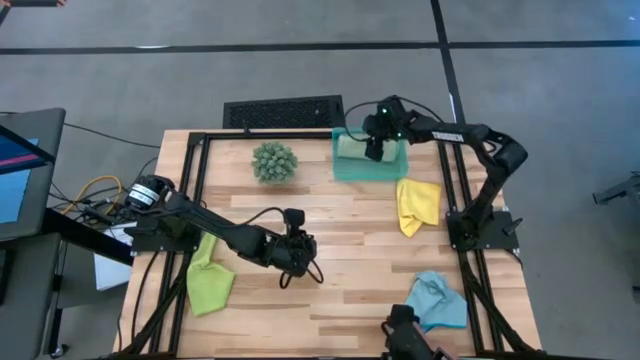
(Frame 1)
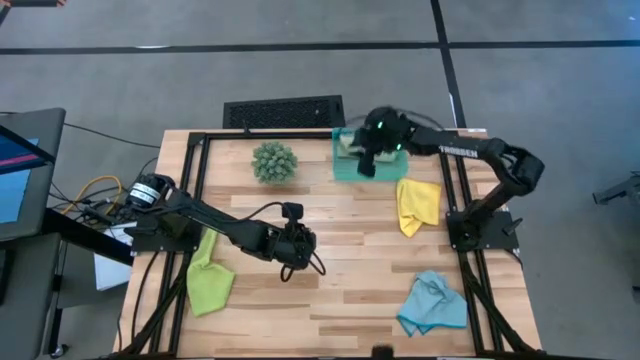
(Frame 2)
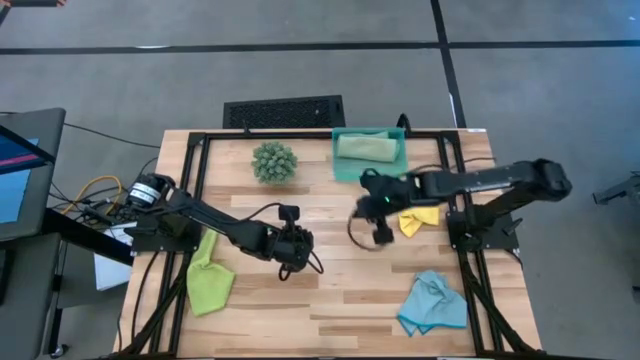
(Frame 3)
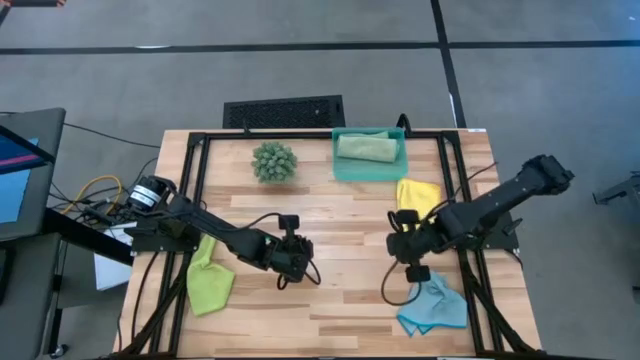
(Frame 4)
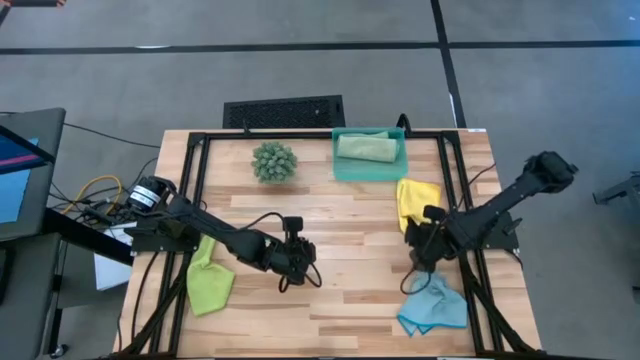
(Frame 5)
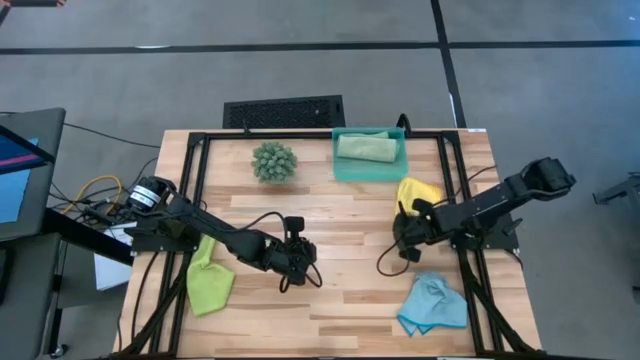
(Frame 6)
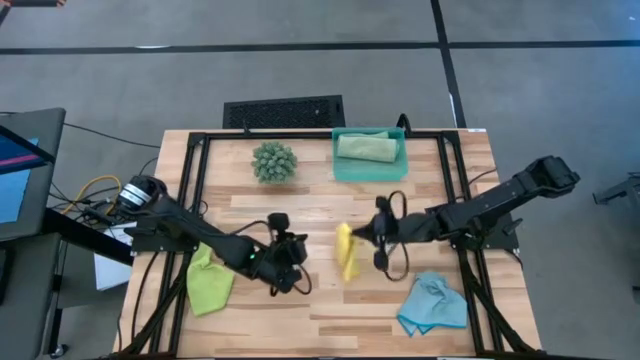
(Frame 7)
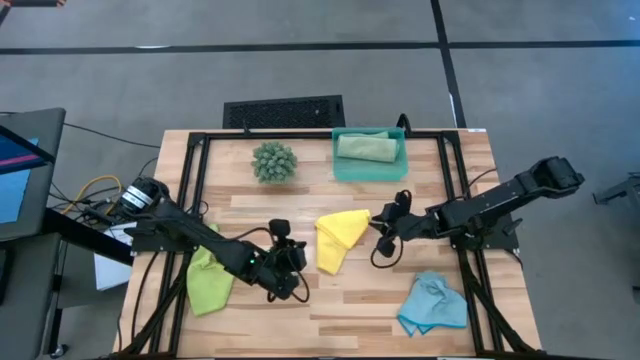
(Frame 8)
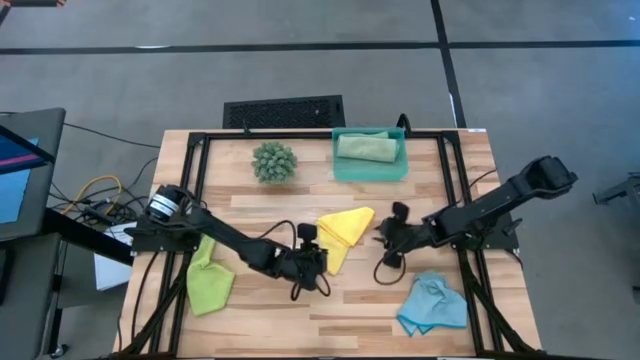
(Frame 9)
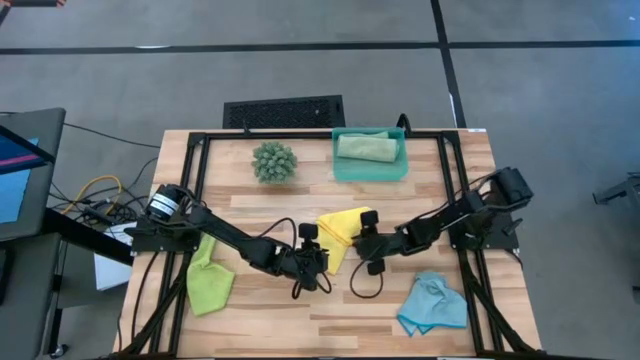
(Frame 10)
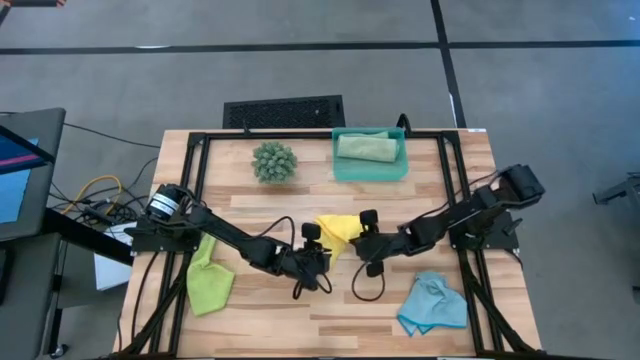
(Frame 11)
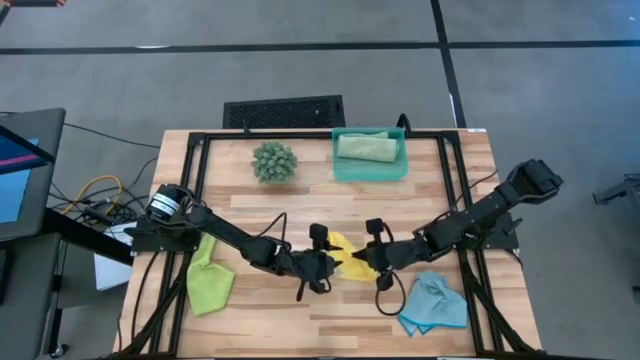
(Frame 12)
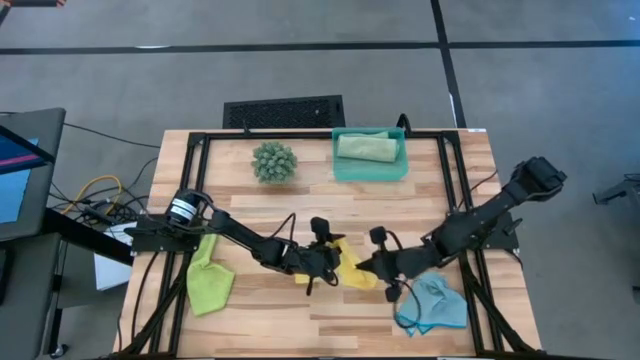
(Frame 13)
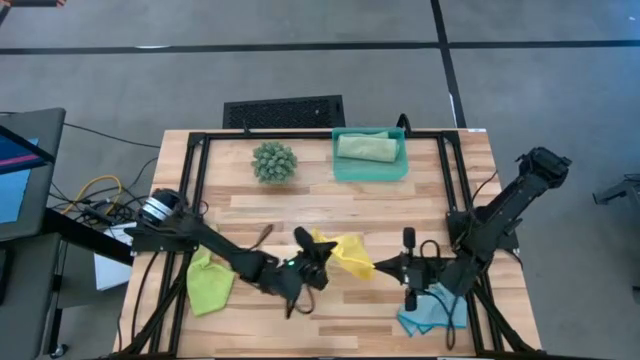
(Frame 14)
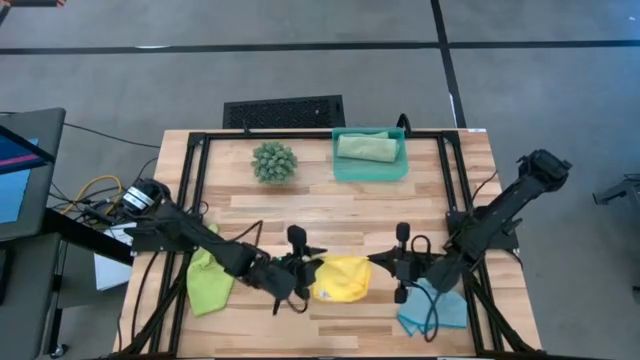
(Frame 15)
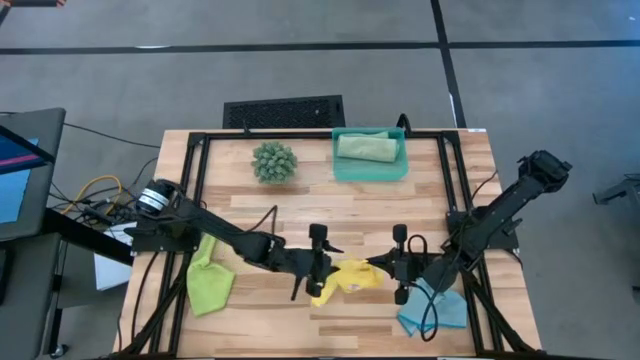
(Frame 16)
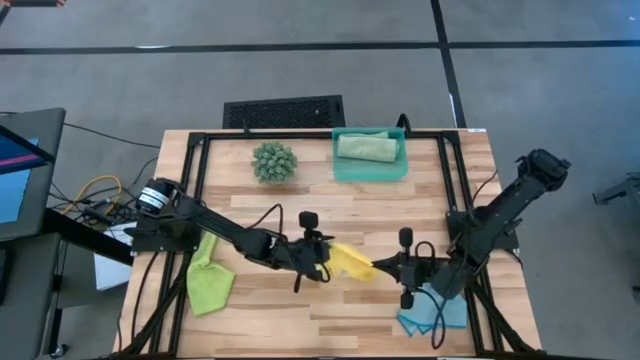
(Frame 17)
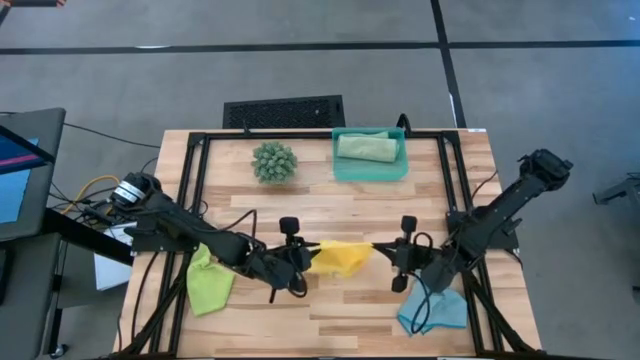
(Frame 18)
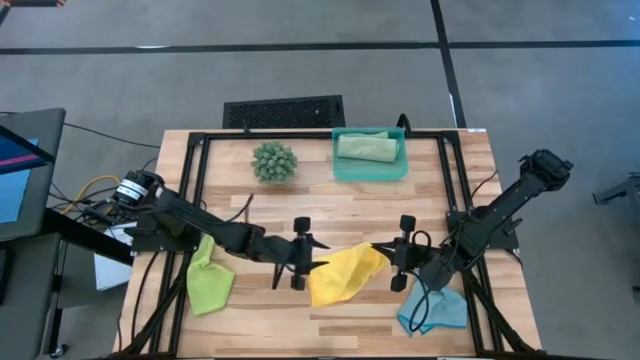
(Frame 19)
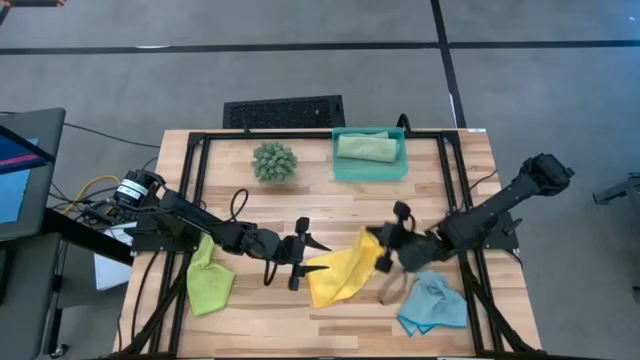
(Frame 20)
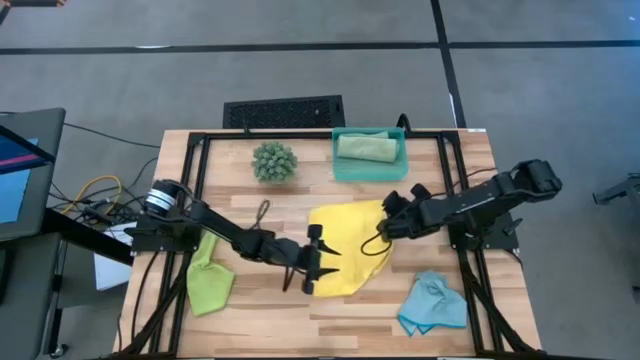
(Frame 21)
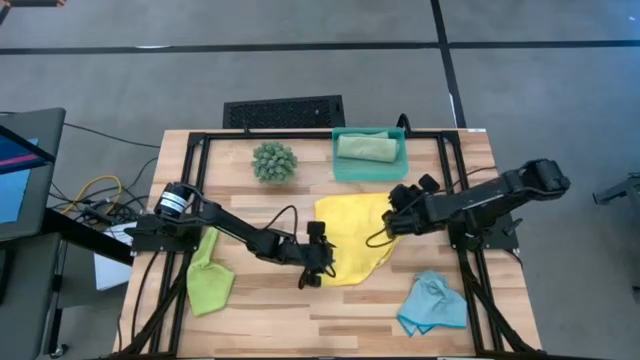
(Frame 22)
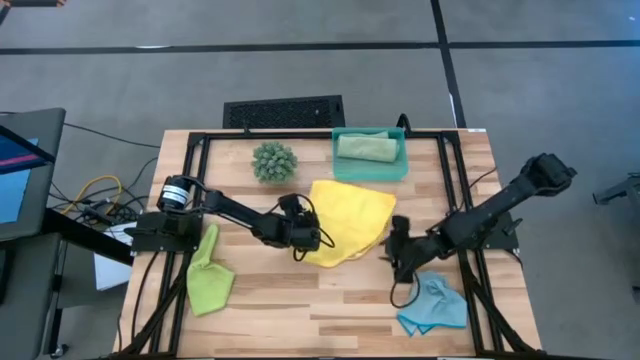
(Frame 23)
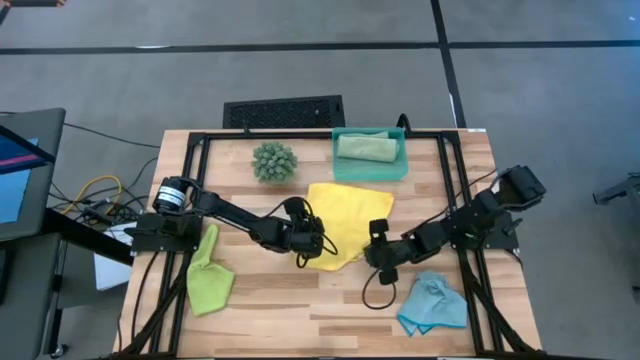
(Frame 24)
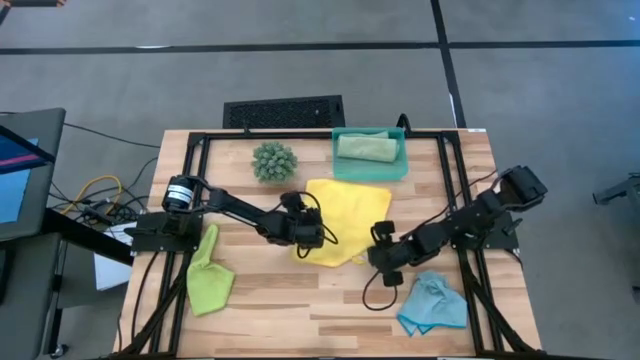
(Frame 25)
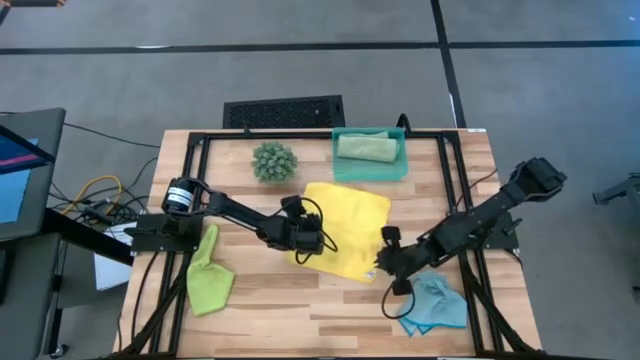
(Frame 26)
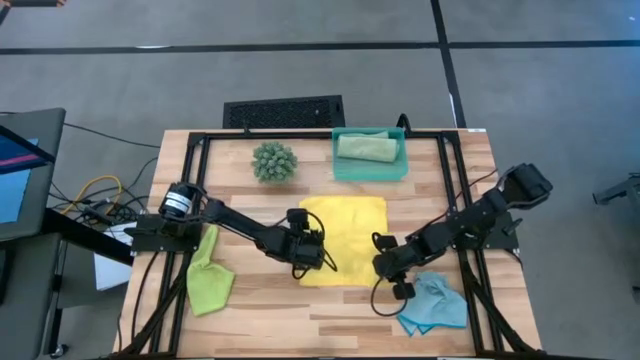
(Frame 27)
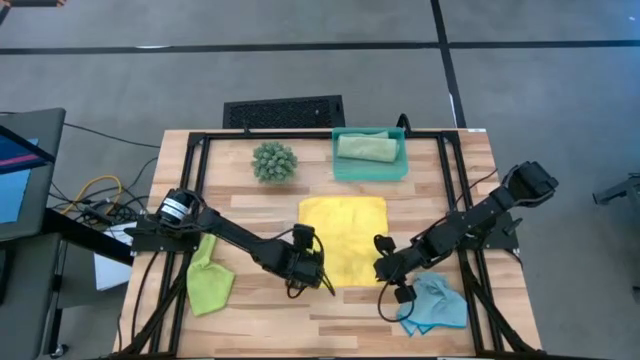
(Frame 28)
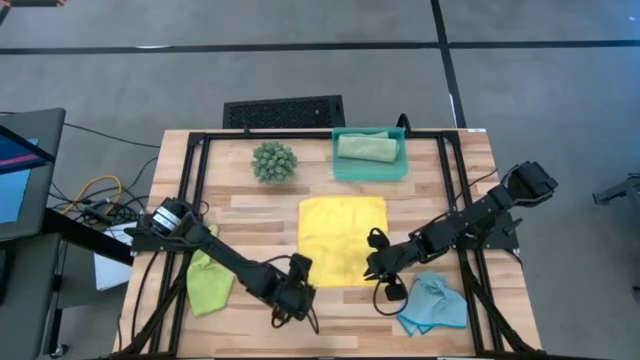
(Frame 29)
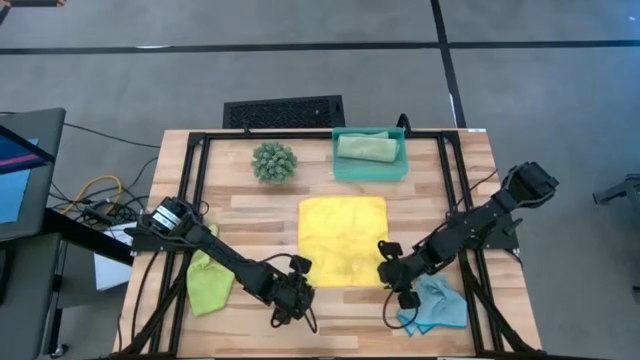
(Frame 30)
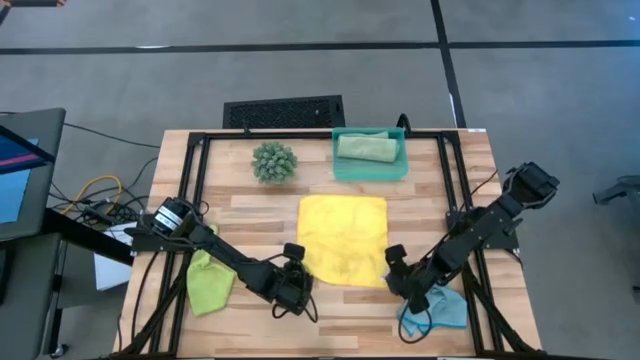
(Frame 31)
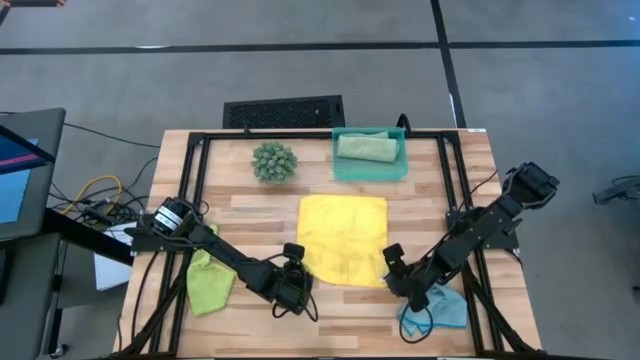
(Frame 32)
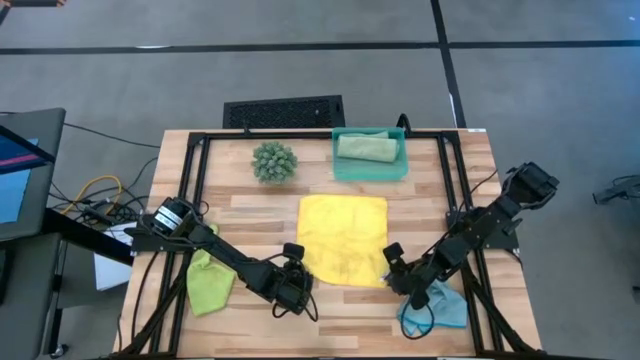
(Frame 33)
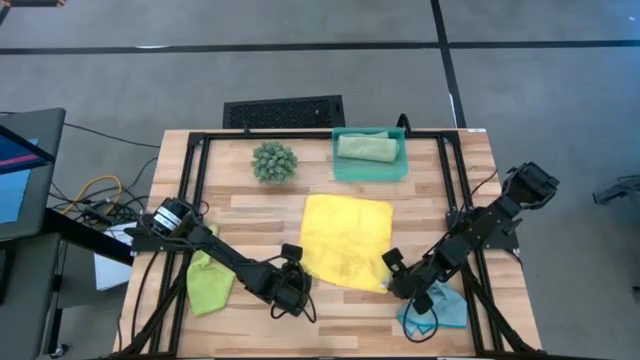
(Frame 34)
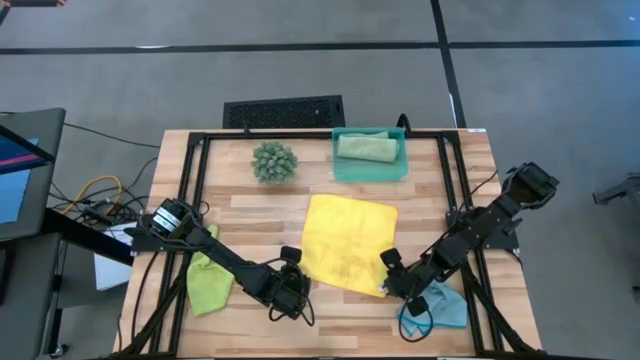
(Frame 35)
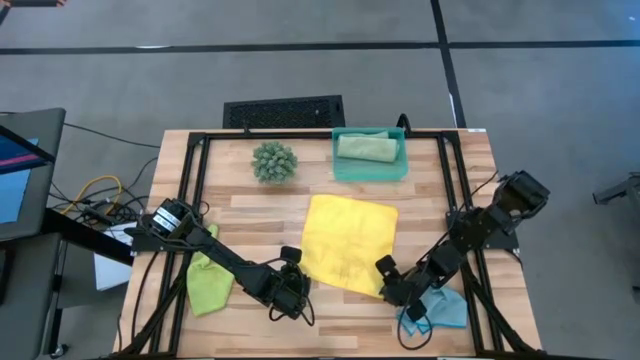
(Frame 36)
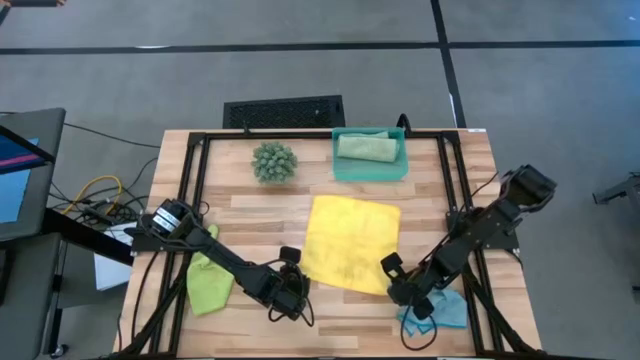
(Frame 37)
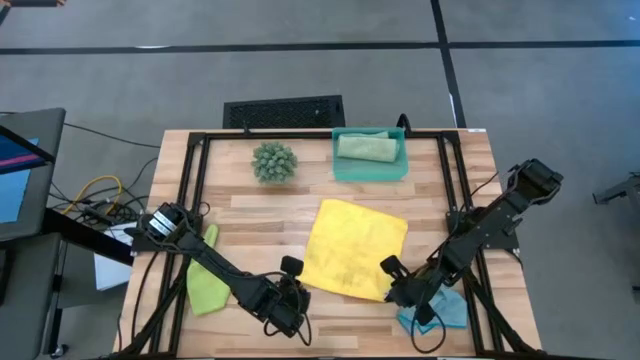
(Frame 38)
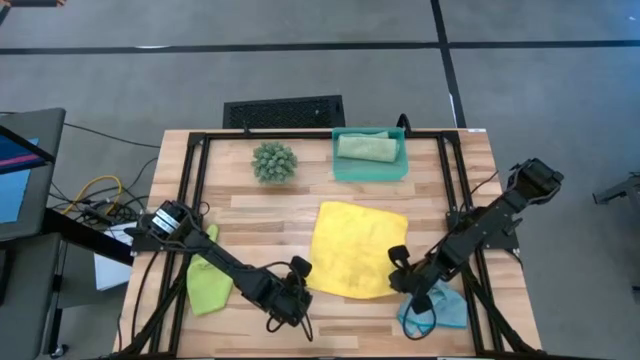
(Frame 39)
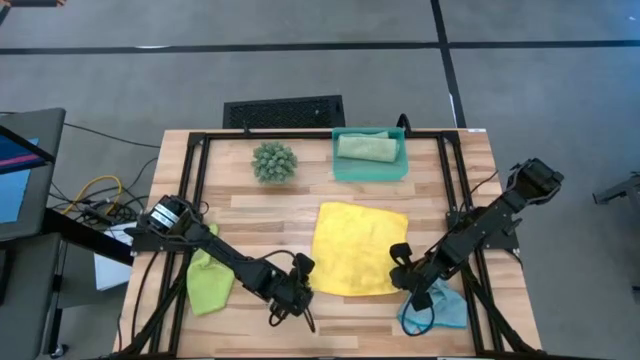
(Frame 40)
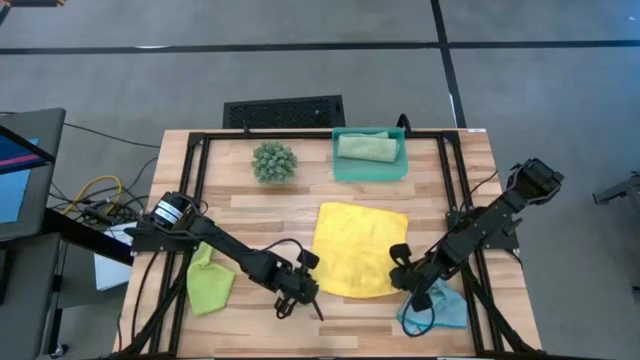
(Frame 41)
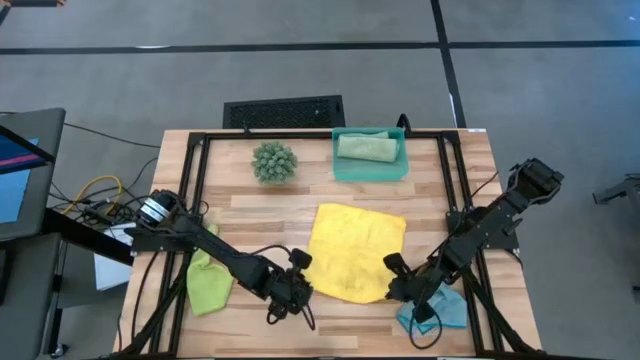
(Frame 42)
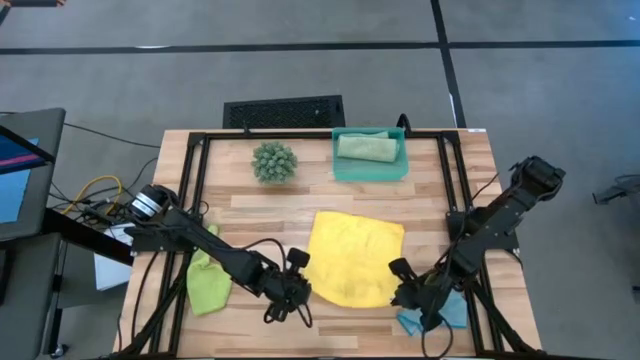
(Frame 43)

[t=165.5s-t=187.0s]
Task: Roll microfiber towels into tight, uniform cylinder then place into a basket
Roll the yellow microfiber cloth
